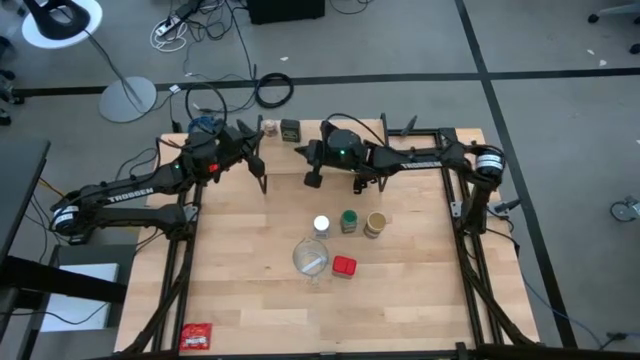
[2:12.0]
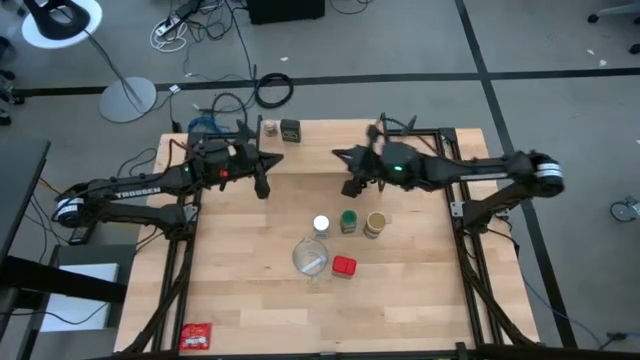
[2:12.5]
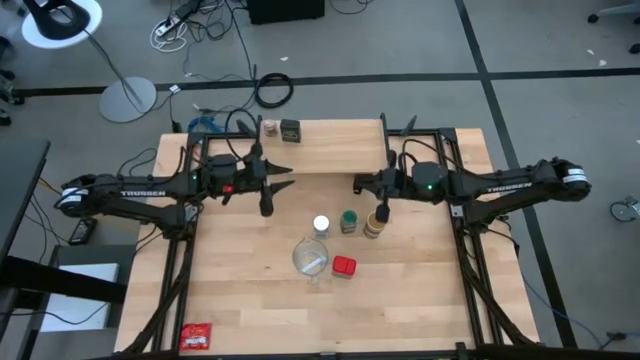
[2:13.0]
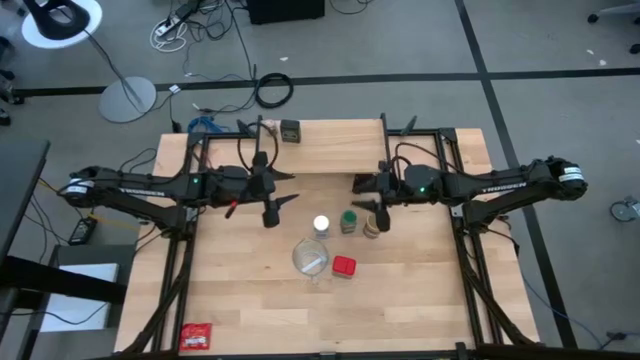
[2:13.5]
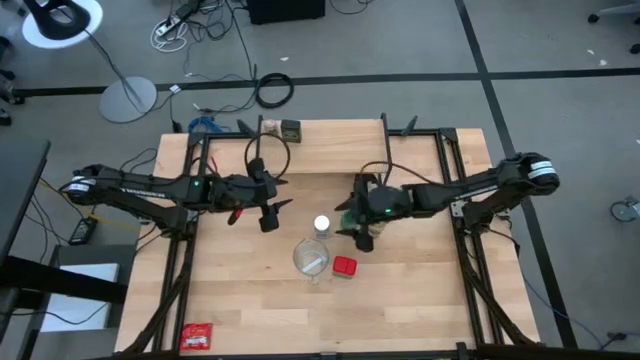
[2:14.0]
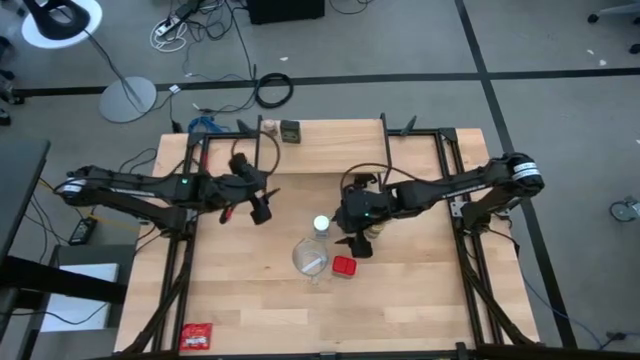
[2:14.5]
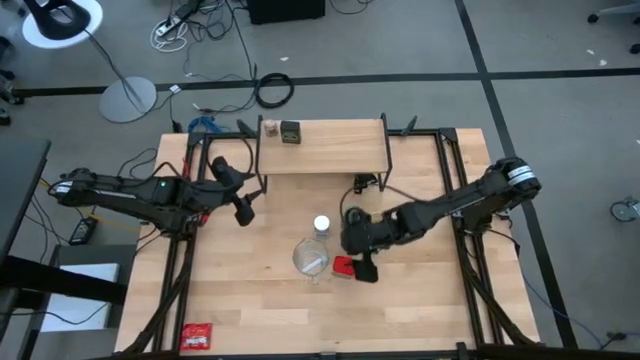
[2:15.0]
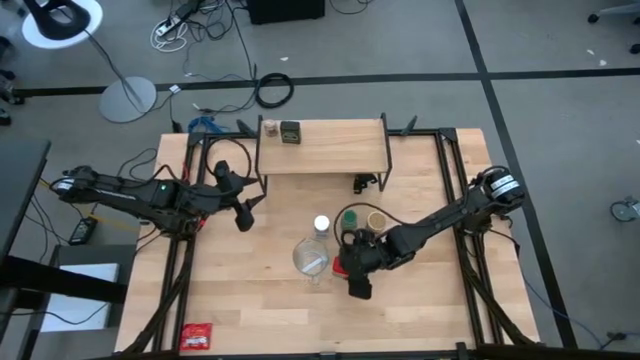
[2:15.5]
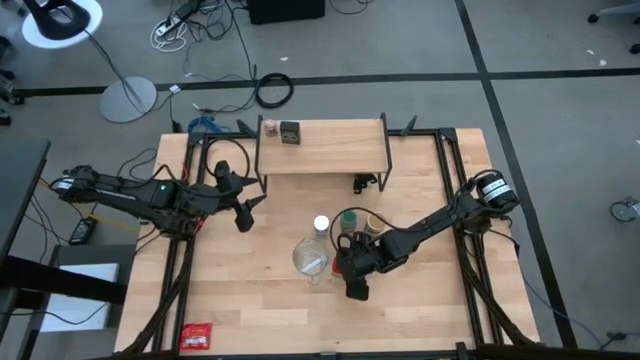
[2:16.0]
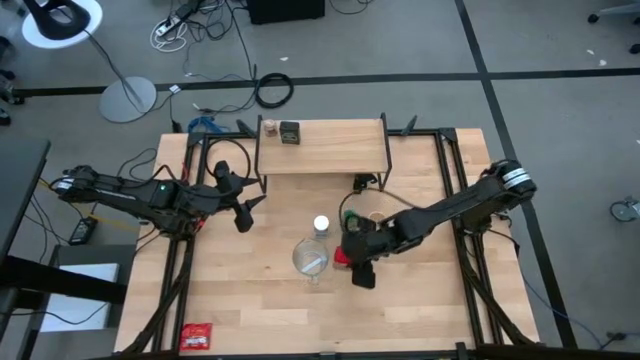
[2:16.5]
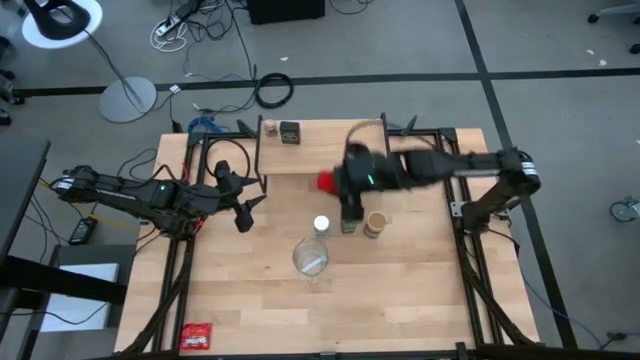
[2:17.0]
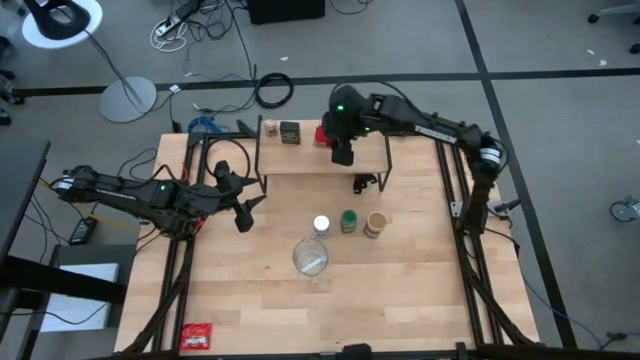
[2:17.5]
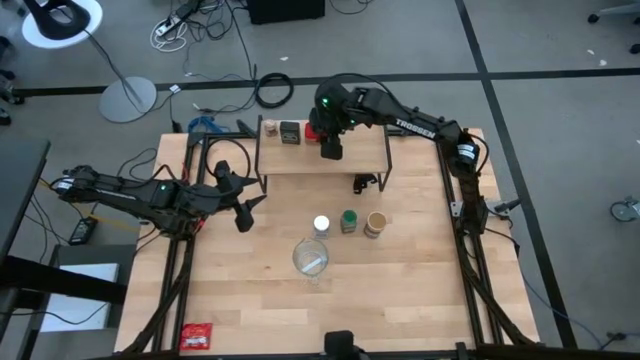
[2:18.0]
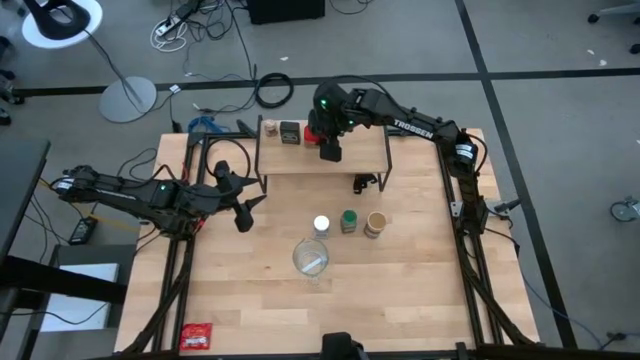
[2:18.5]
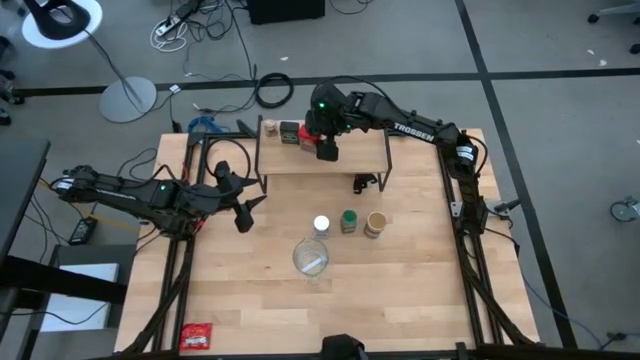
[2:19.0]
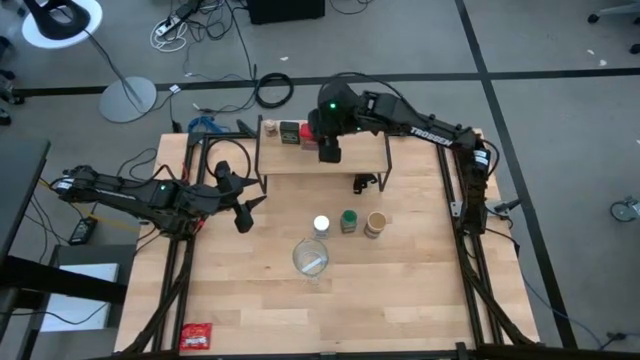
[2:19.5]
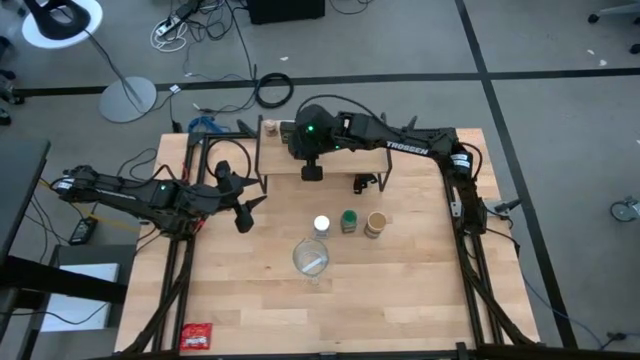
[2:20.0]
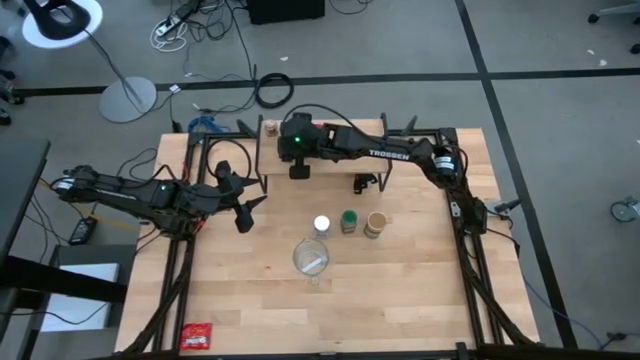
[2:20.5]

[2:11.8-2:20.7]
Task: Shelf spices
Put the red seasoning can on the shelf

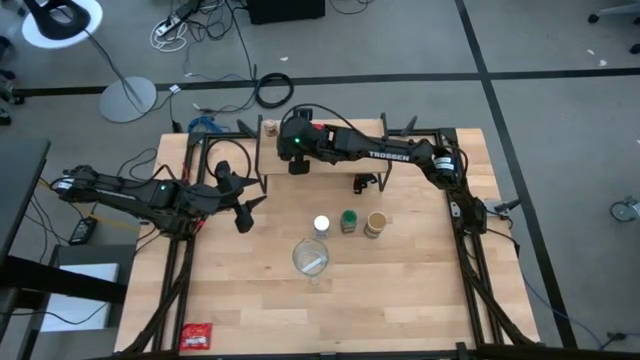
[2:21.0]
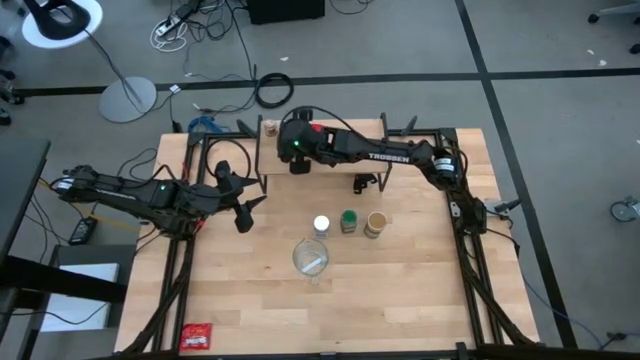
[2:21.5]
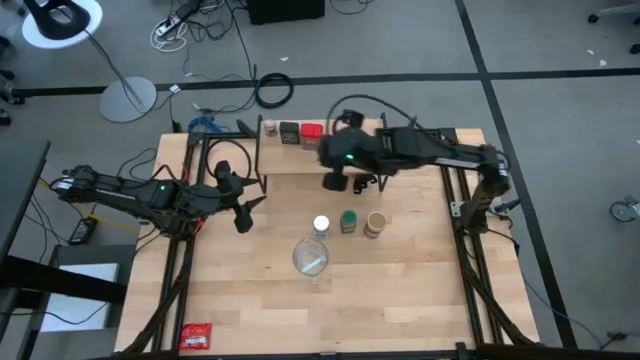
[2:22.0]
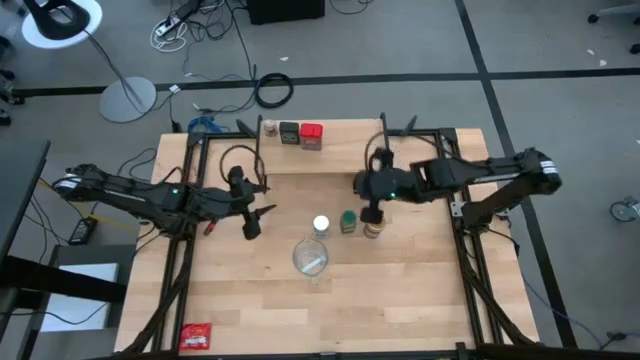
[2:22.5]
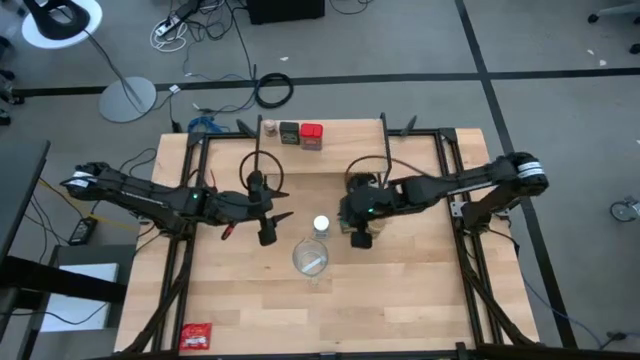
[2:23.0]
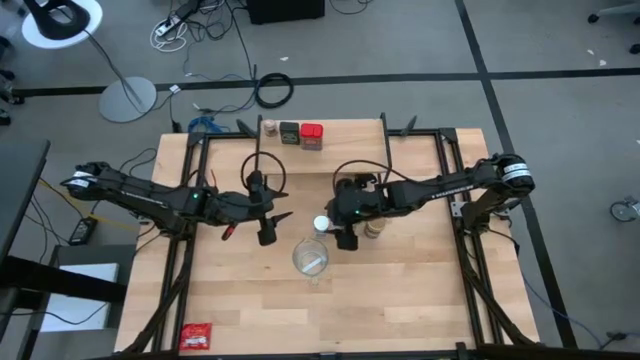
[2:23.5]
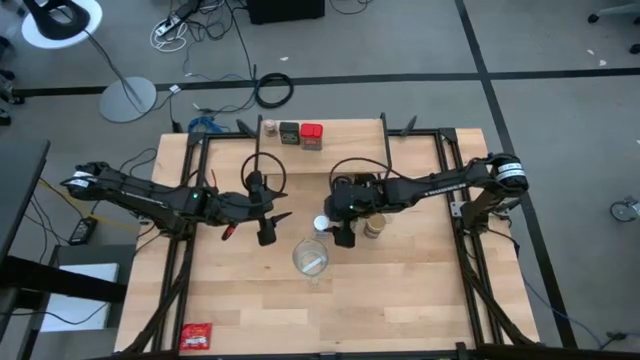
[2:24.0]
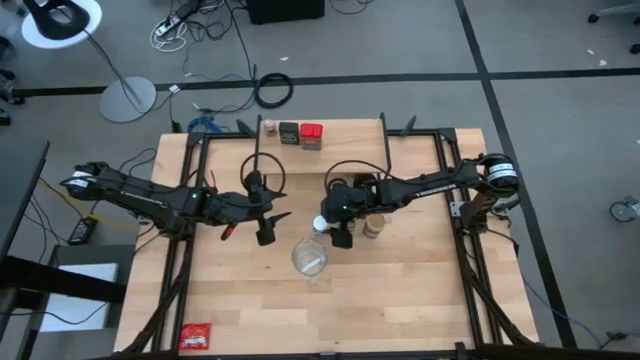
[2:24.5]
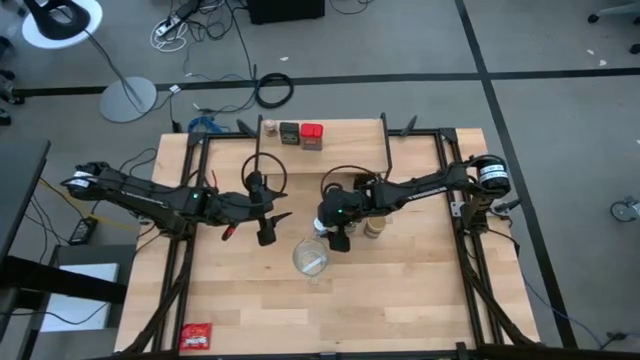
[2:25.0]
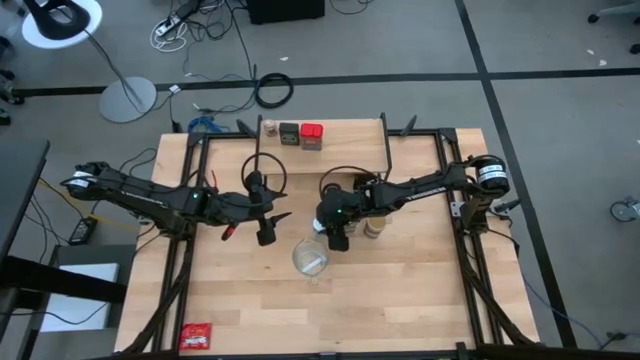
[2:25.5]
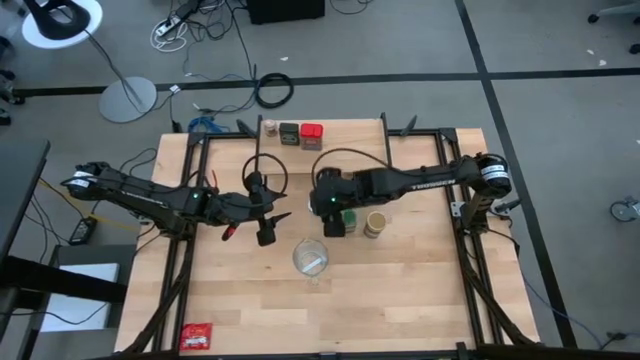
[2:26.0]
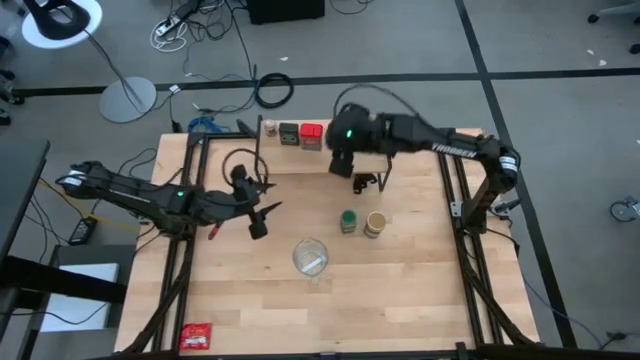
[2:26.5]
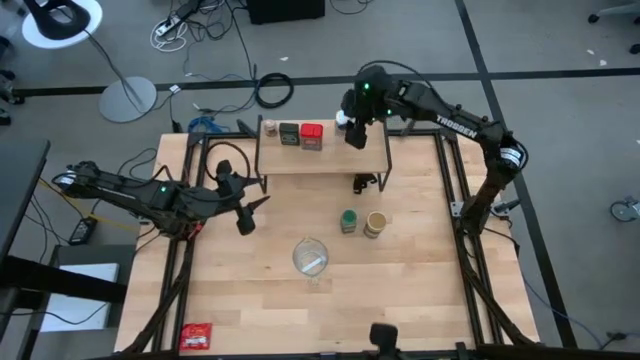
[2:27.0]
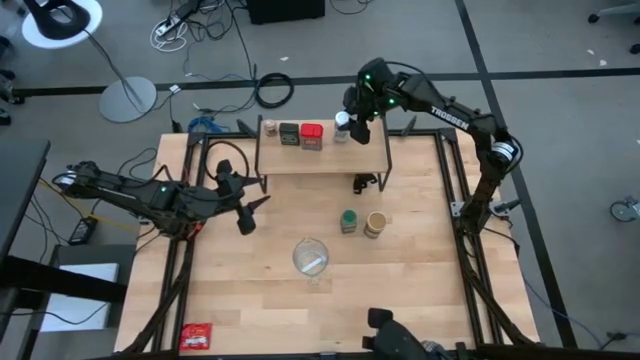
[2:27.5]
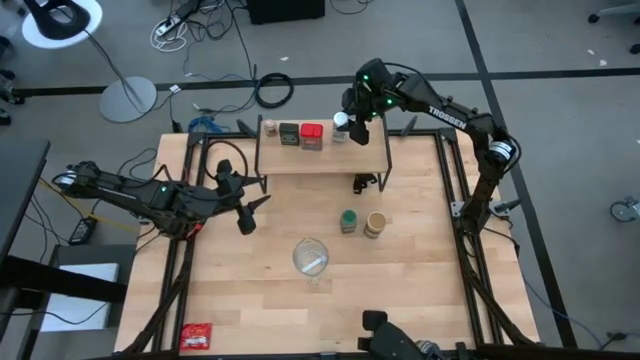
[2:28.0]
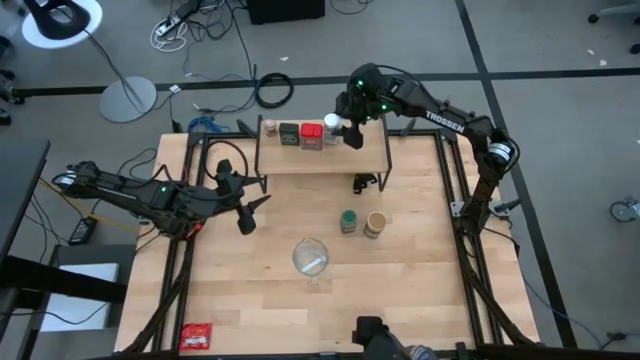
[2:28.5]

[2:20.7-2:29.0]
Put the white seasoning bottle on the shelf

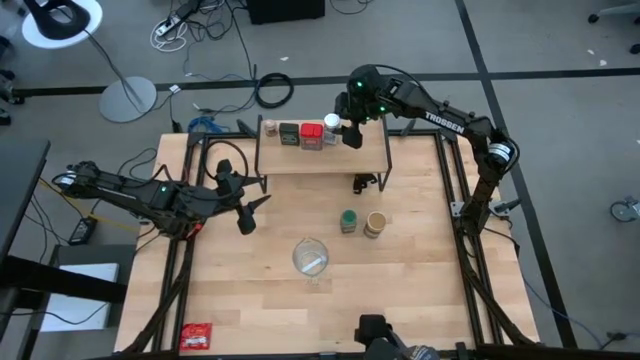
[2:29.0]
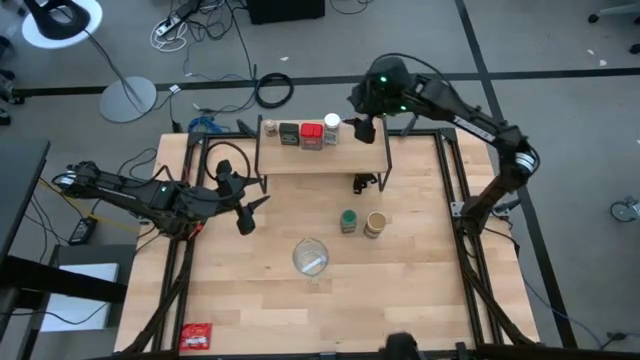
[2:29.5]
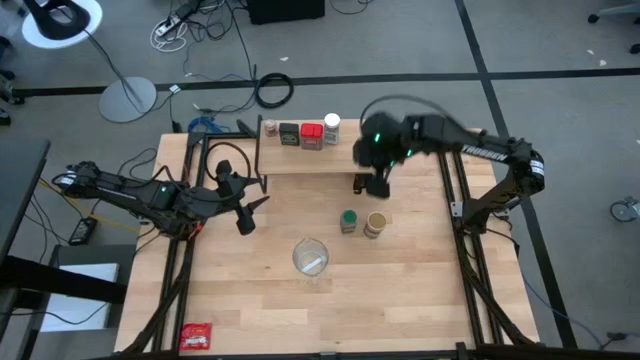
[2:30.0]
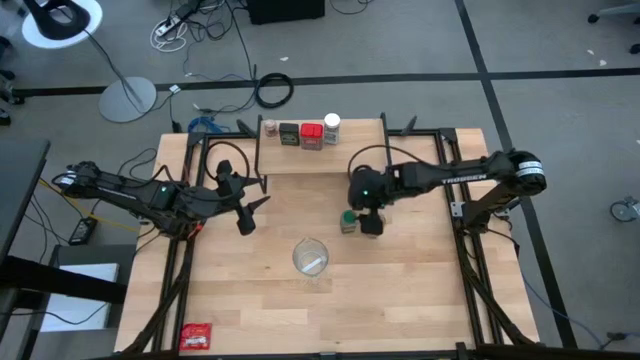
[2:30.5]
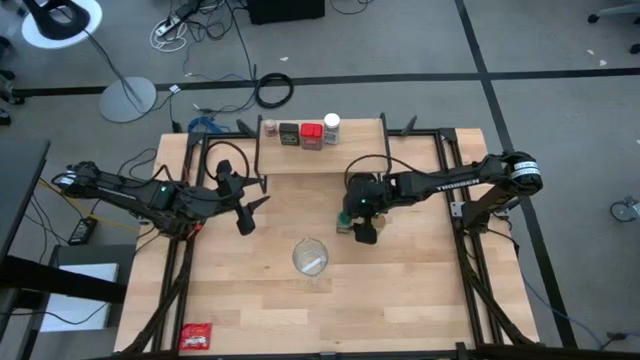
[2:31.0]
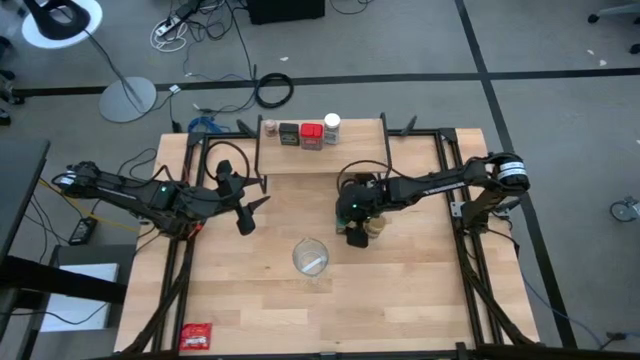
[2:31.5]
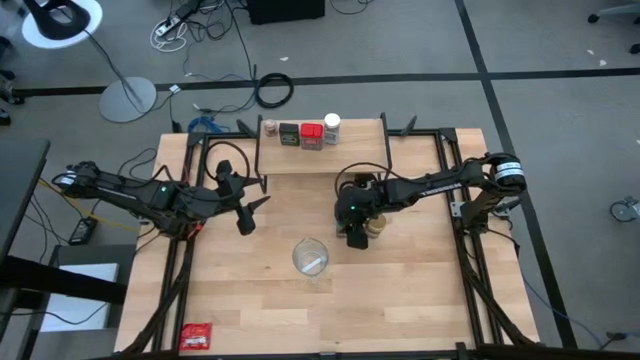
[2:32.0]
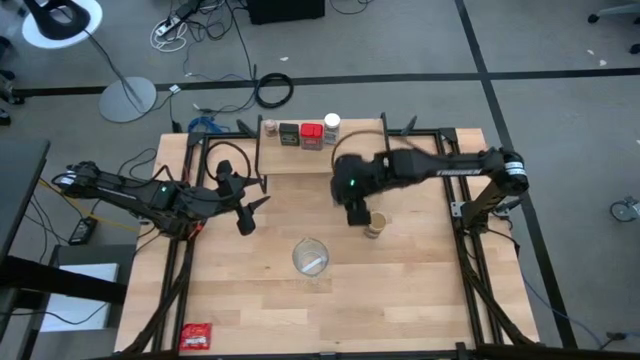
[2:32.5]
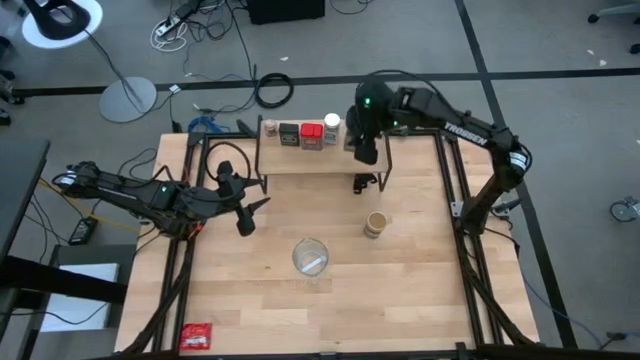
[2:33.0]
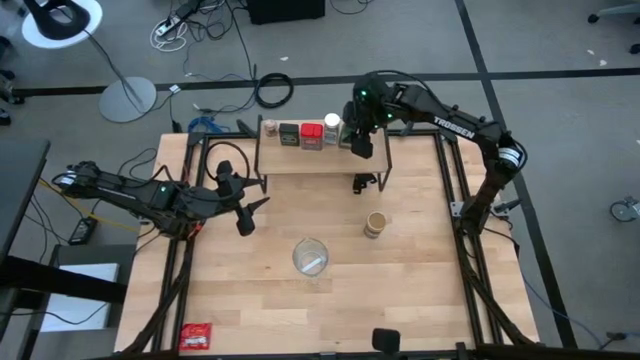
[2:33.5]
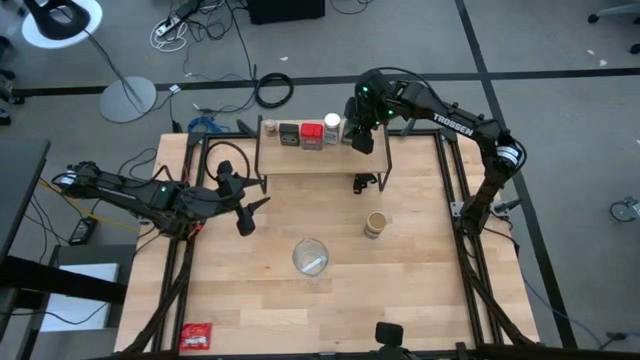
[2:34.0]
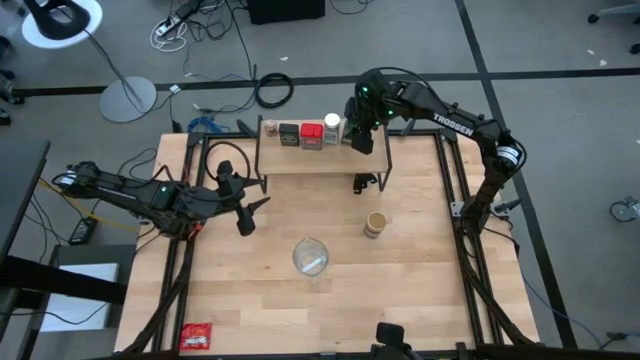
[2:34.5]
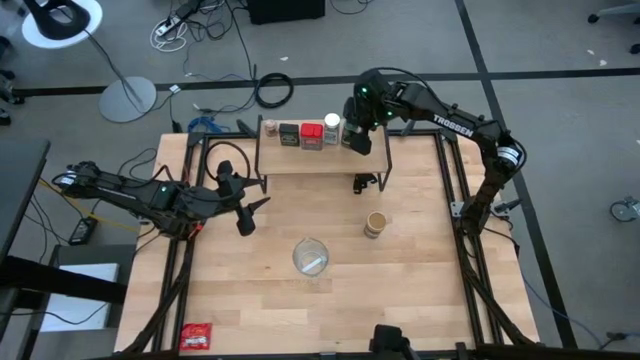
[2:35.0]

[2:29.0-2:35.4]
Put the green seasoning bottle on the shelf
